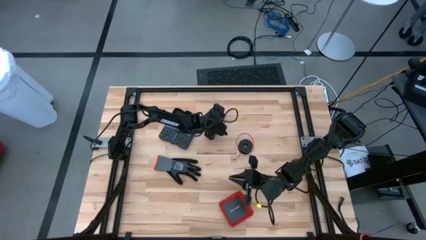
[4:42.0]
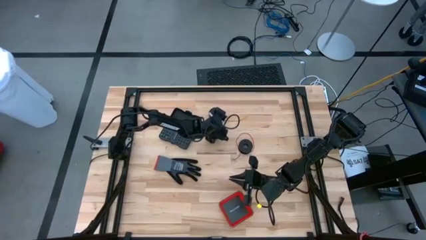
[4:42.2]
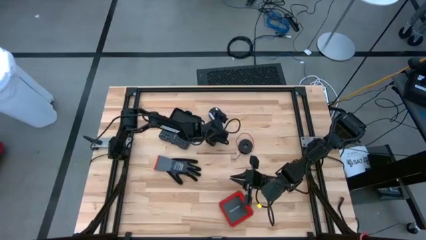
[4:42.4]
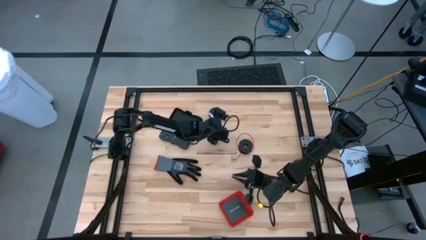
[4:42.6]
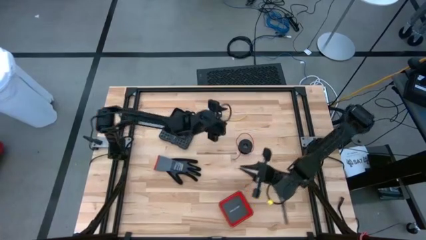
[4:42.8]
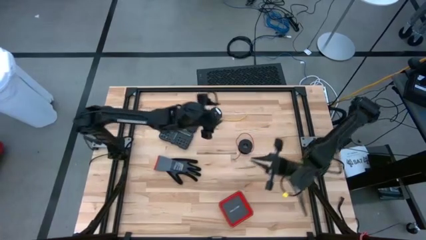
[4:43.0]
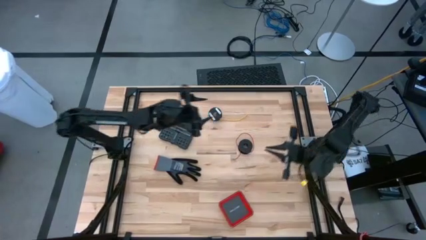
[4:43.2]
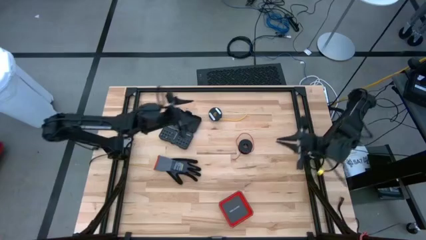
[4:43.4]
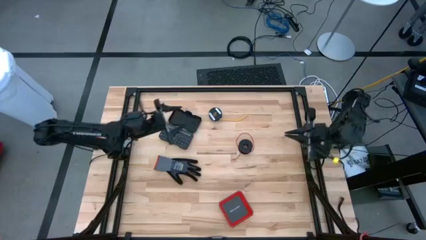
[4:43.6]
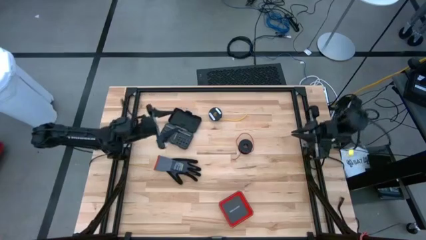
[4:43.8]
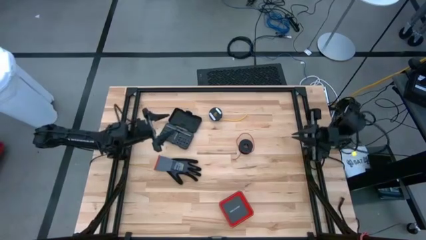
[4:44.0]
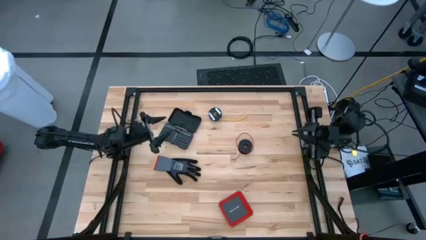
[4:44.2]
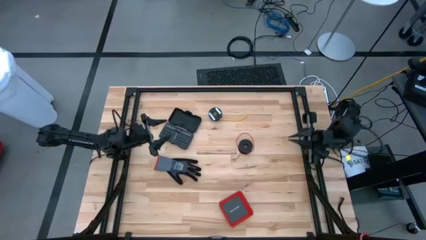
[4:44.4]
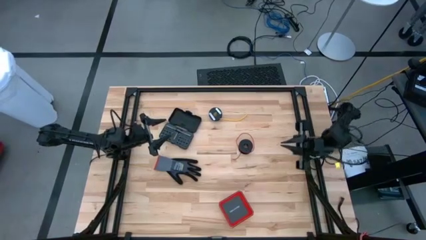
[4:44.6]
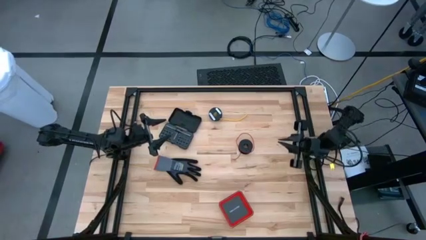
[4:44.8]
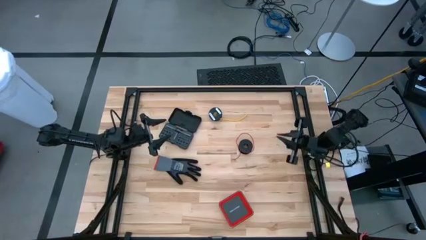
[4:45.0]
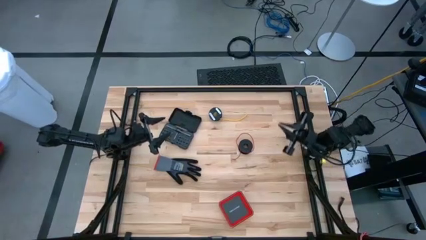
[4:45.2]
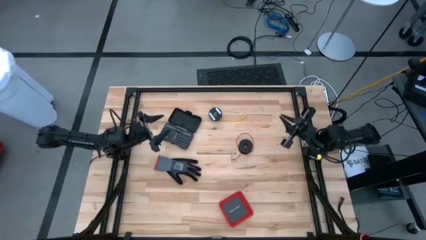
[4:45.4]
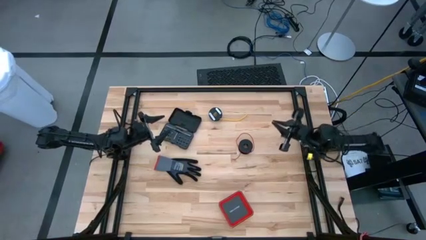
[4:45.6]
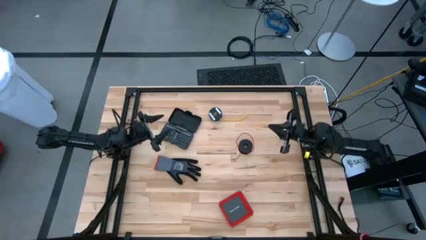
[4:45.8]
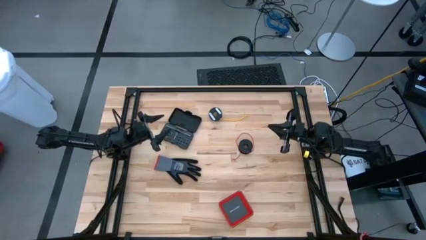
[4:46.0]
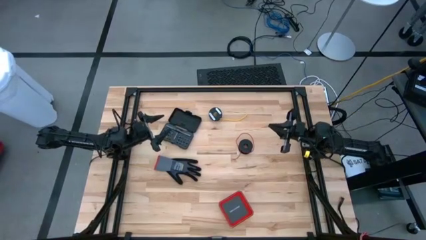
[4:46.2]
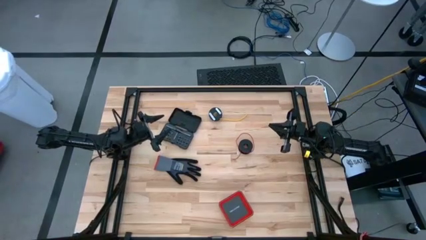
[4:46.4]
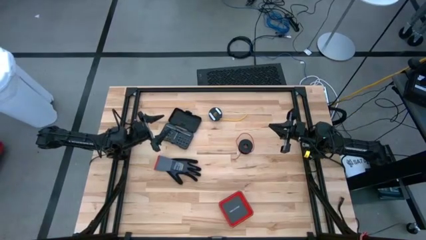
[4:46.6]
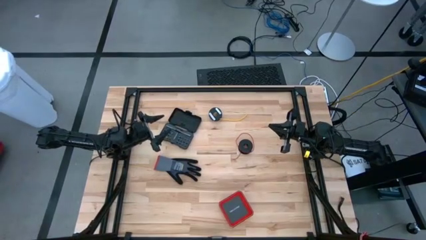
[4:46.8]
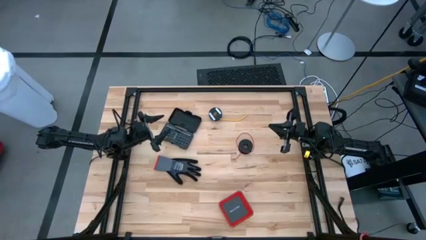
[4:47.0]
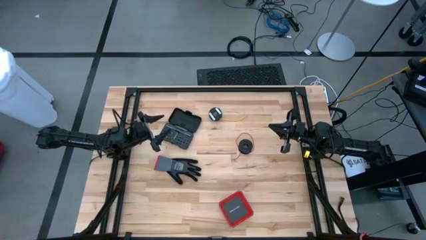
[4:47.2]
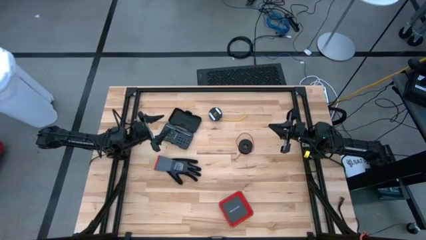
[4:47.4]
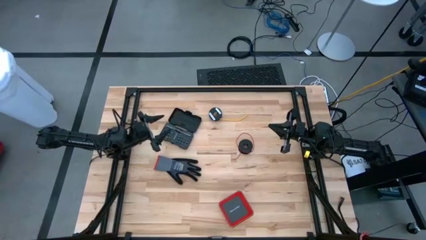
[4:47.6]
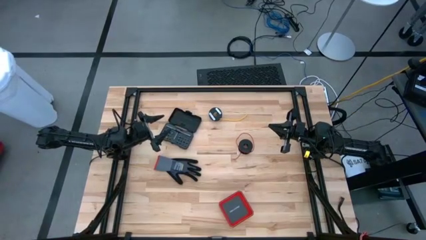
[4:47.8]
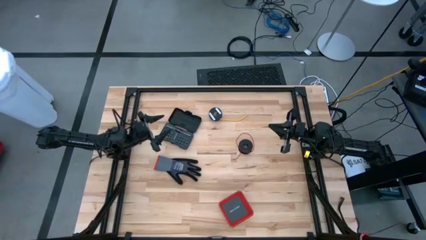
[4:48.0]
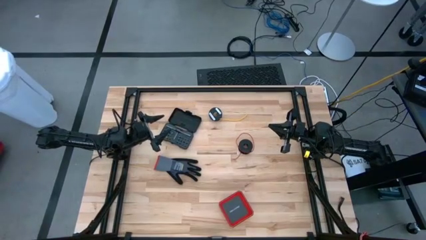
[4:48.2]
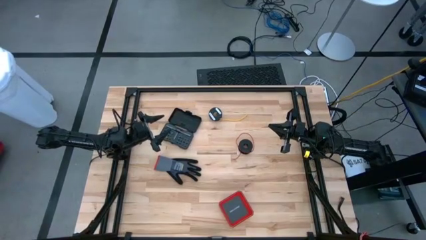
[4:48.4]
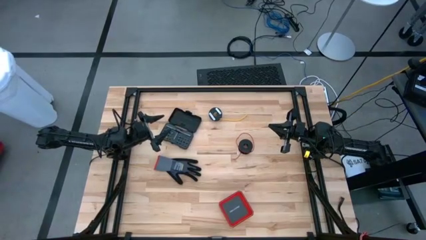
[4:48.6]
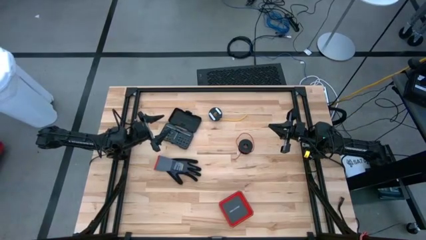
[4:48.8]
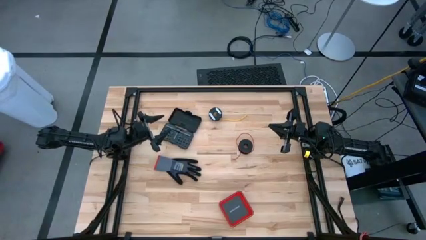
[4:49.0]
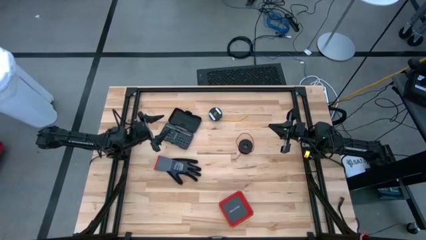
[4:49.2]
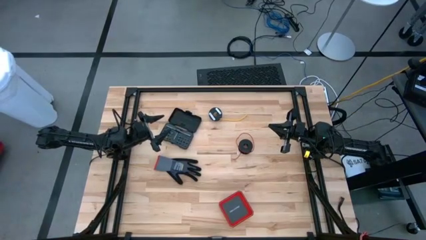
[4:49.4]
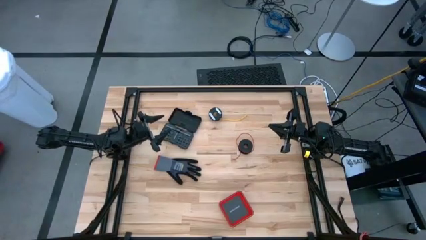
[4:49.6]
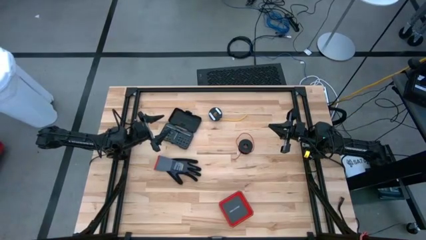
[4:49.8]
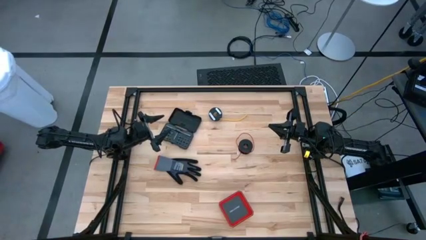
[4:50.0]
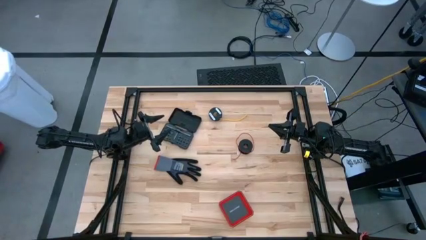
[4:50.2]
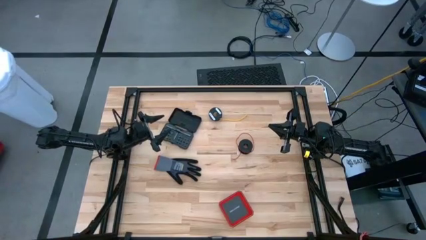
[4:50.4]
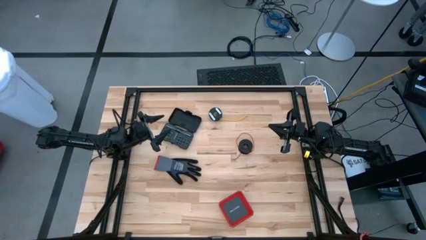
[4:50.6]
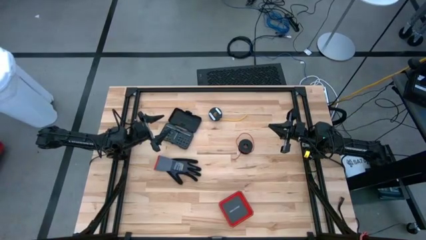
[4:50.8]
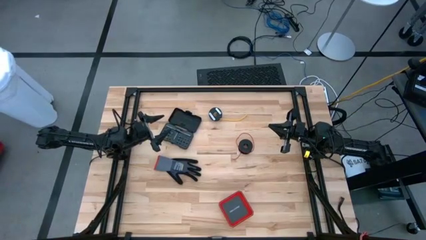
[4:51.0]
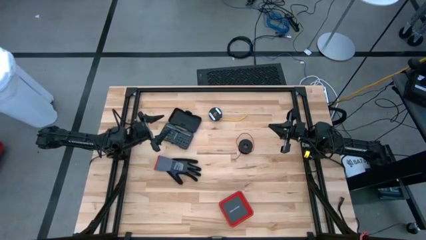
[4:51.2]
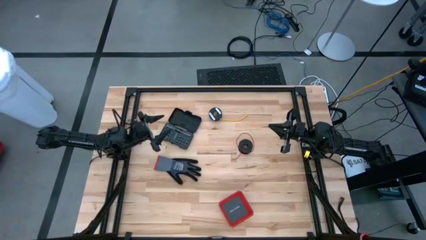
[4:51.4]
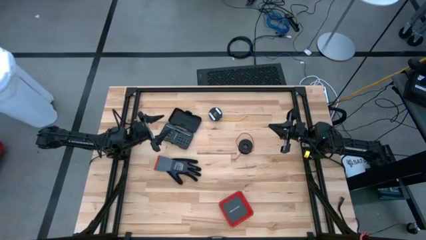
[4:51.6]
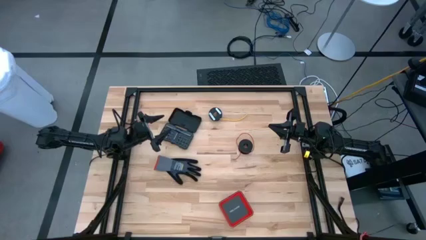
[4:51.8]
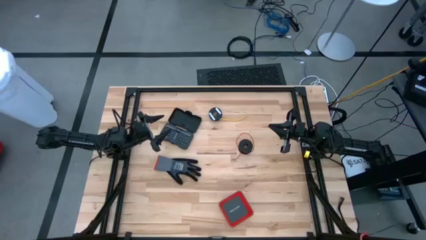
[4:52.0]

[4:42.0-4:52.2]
Task: Coil cords
Return to Home Position
